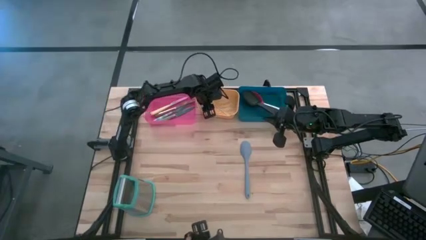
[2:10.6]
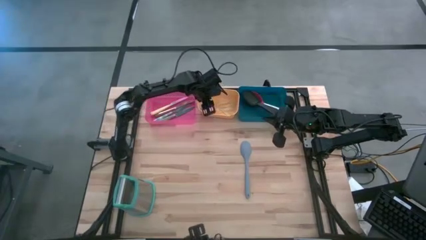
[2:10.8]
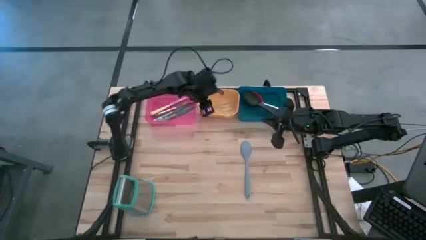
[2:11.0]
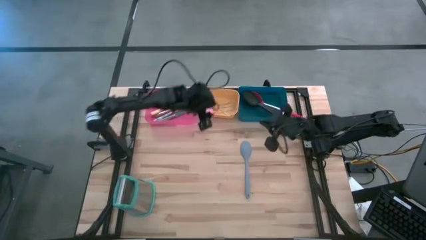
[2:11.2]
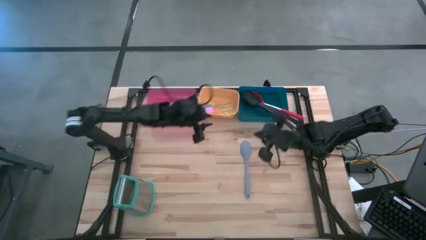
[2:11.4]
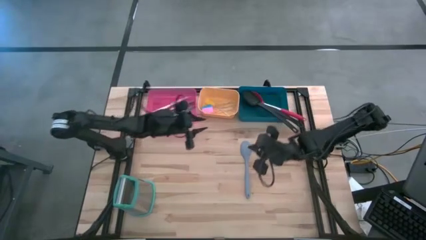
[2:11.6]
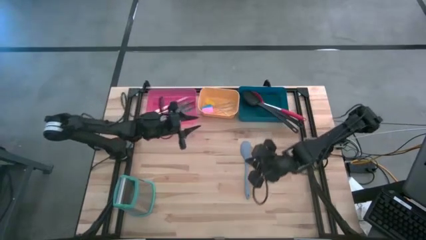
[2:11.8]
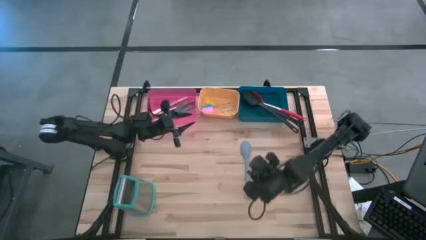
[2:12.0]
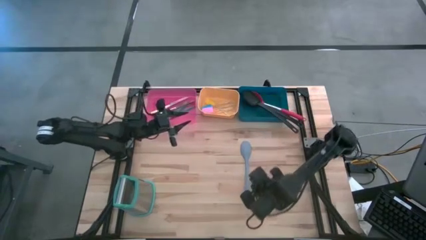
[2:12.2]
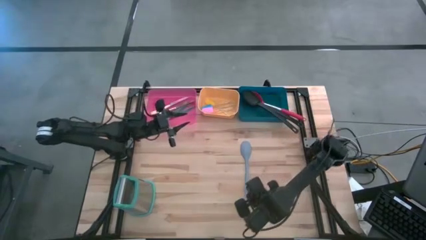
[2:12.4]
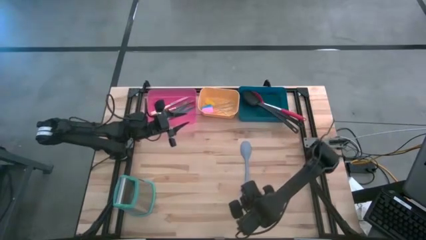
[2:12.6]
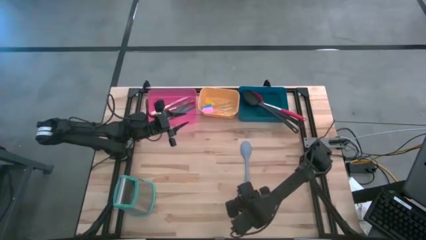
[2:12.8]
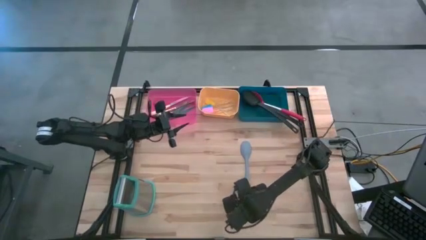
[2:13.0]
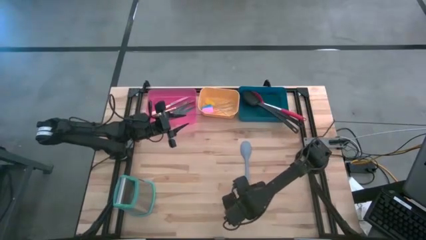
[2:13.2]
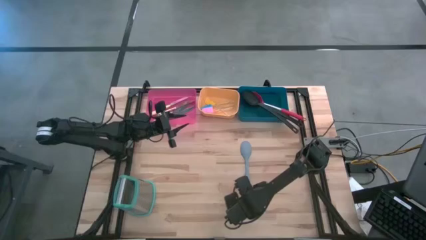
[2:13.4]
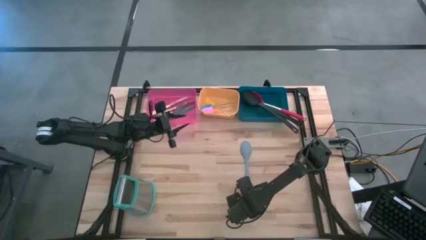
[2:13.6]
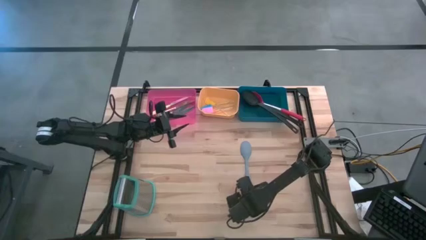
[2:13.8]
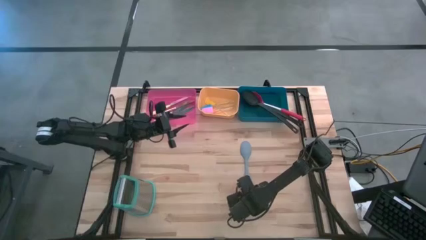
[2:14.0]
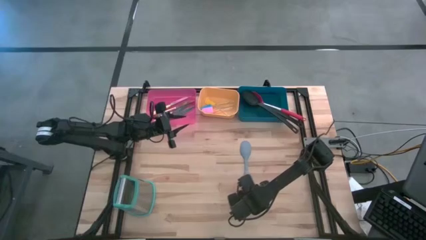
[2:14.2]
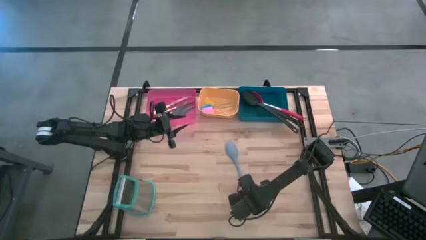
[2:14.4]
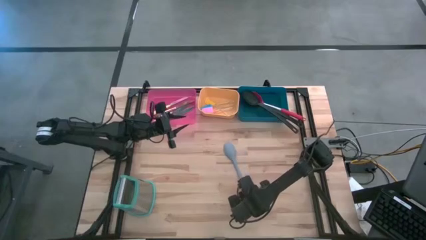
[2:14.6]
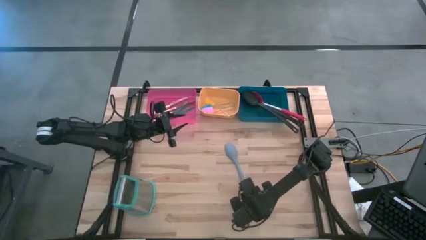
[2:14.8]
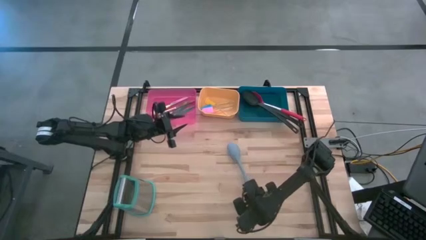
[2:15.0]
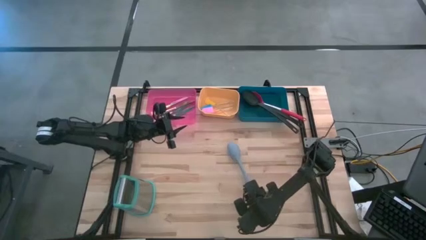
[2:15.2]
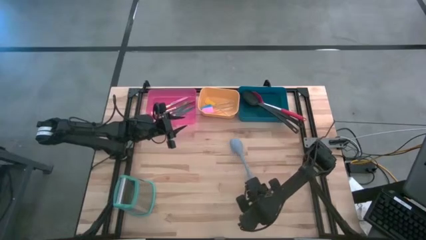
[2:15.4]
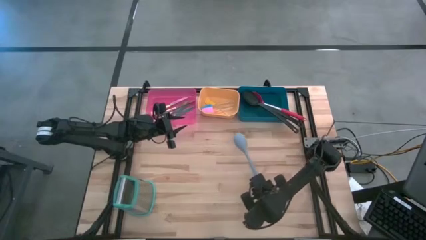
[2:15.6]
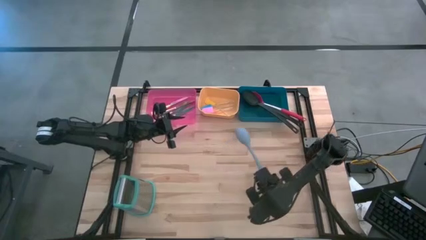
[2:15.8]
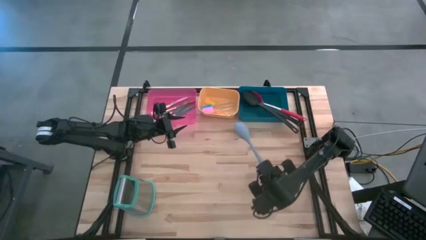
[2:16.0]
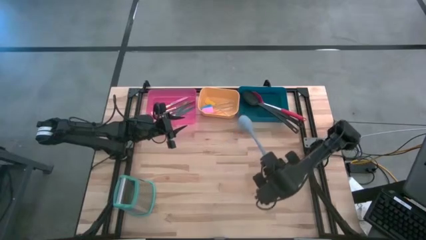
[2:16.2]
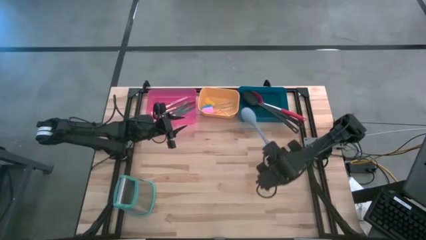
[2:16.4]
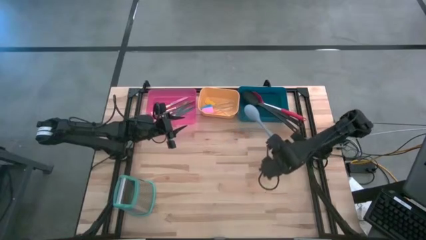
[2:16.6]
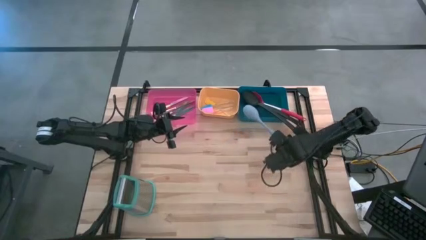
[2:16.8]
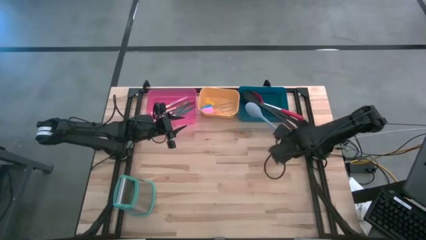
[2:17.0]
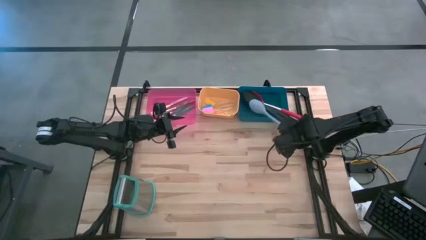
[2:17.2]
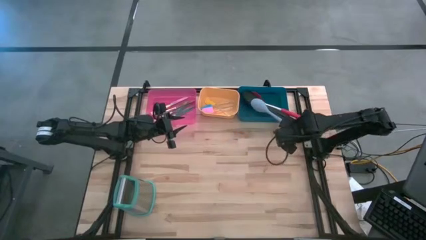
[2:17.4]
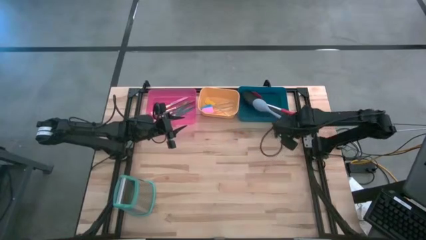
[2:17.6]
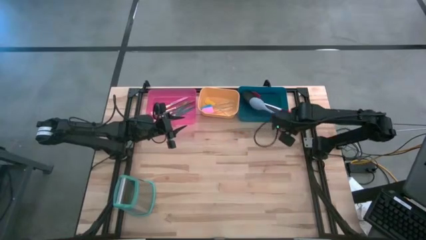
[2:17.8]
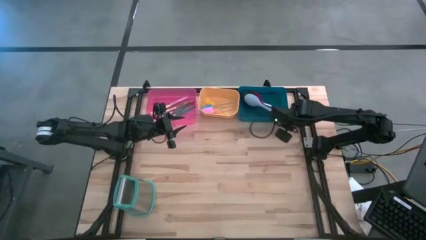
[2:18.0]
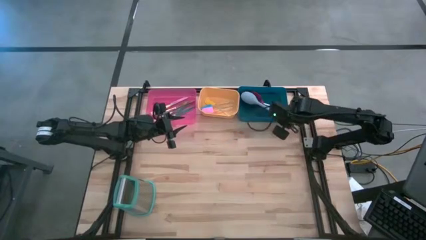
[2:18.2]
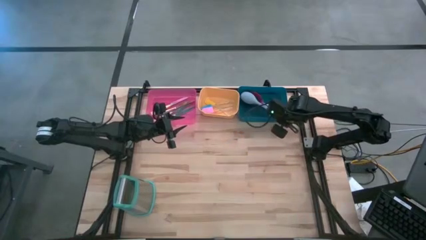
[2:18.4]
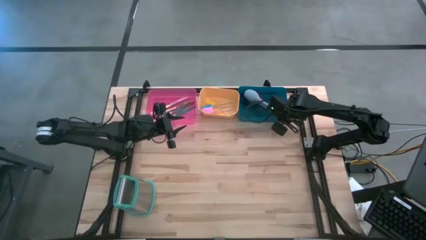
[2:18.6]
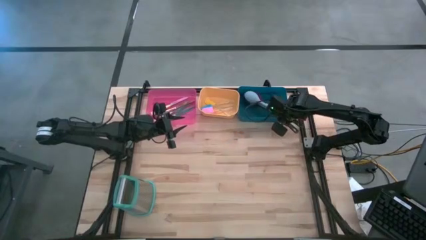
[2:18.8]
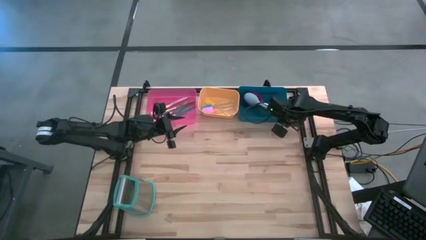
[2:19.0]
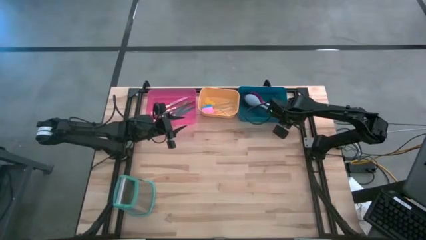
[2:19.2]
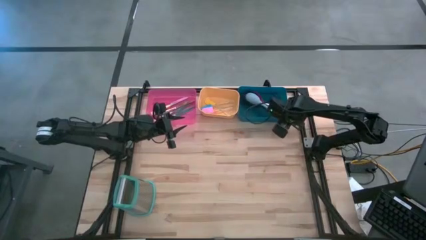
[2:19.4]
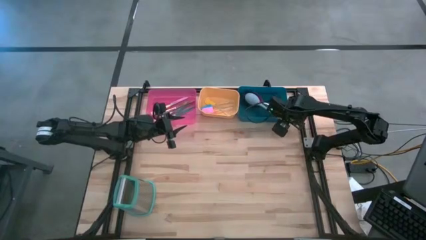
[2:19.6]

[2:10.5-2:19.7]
Task: Pick & Place Kitchen Items
Put the blue spoon into the blue bin

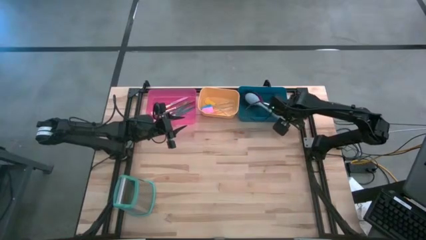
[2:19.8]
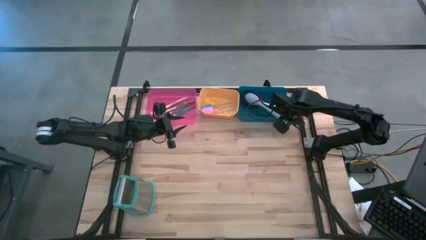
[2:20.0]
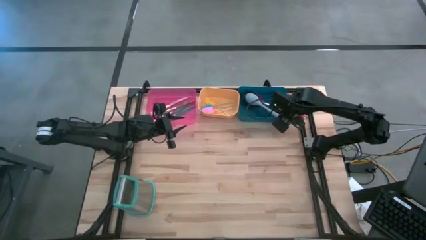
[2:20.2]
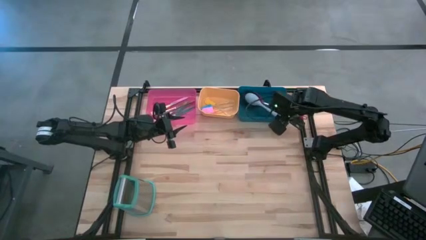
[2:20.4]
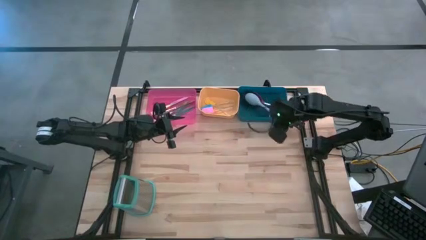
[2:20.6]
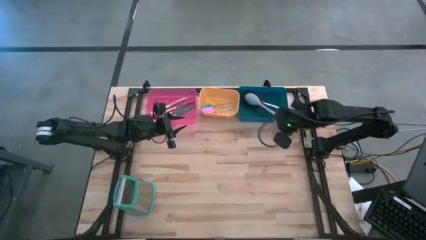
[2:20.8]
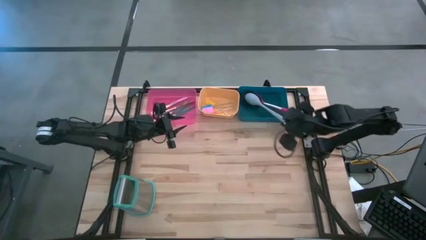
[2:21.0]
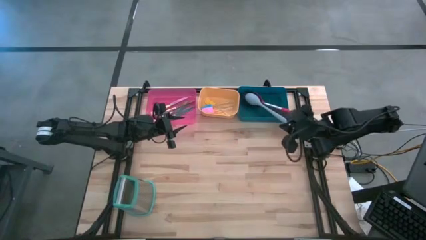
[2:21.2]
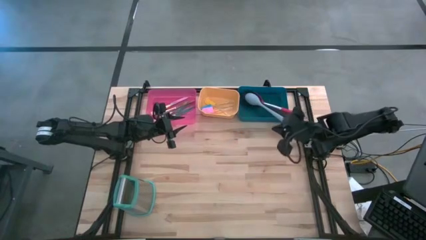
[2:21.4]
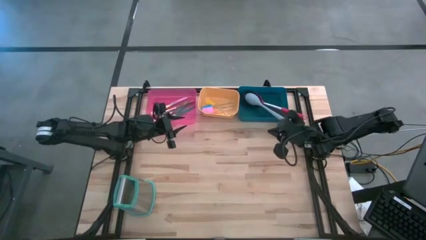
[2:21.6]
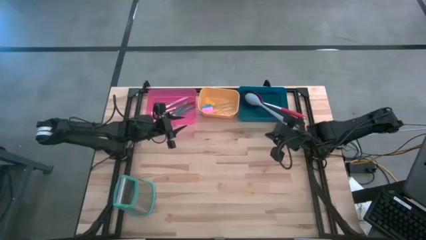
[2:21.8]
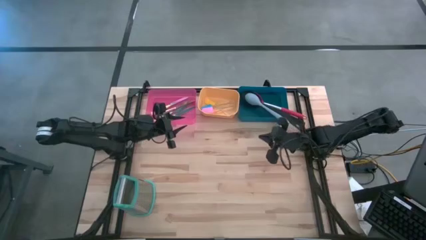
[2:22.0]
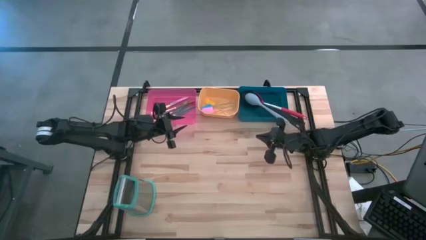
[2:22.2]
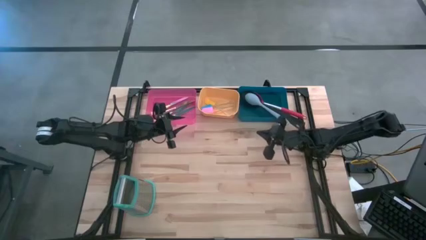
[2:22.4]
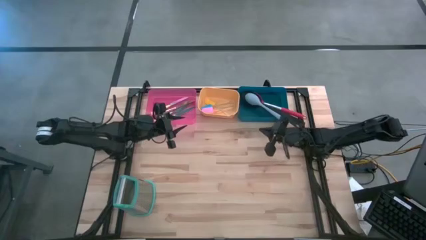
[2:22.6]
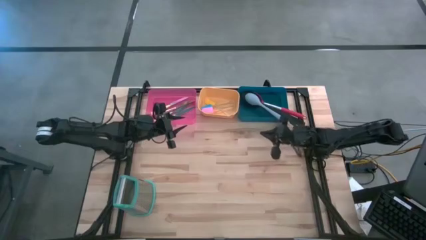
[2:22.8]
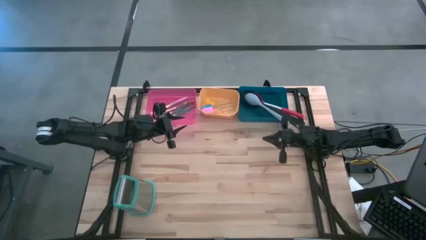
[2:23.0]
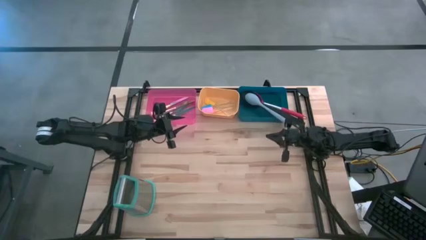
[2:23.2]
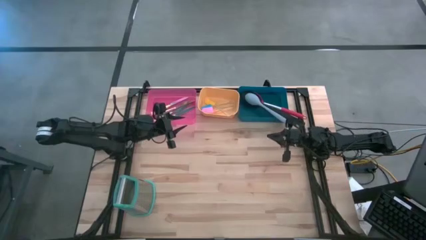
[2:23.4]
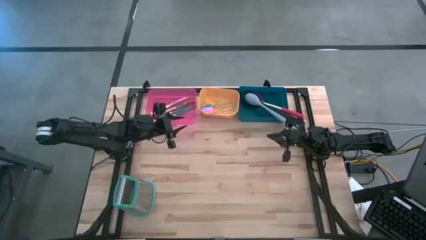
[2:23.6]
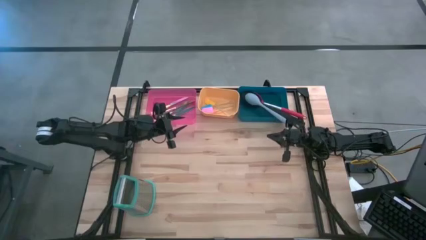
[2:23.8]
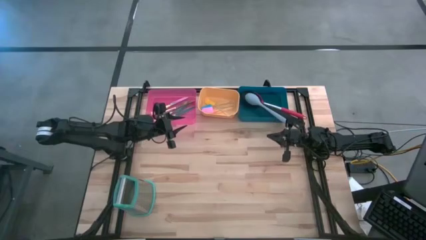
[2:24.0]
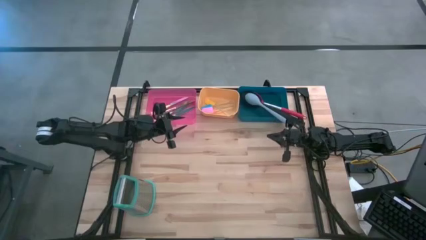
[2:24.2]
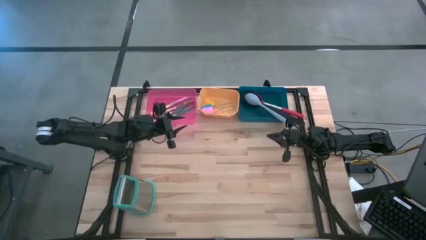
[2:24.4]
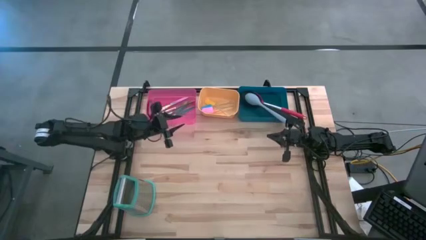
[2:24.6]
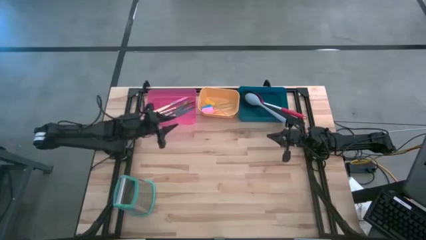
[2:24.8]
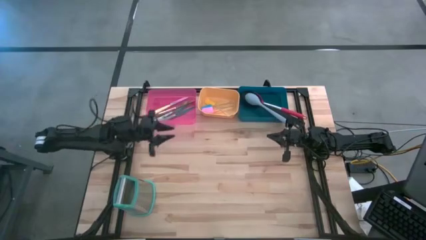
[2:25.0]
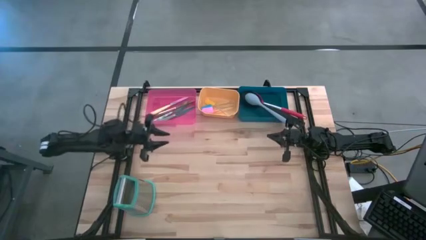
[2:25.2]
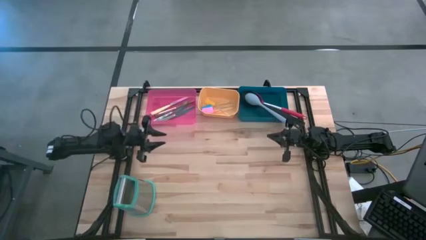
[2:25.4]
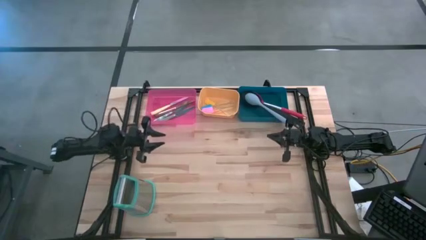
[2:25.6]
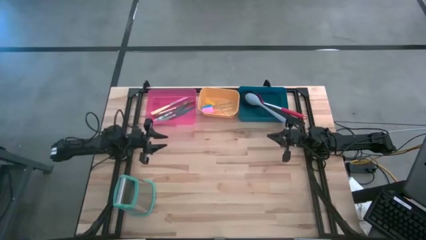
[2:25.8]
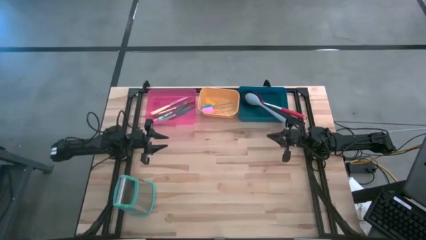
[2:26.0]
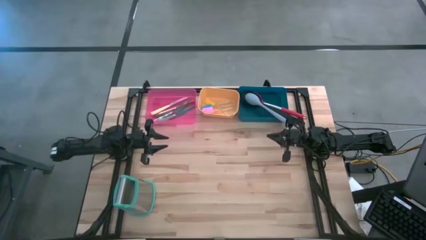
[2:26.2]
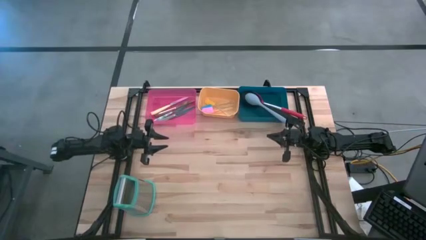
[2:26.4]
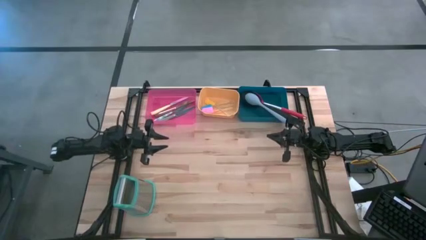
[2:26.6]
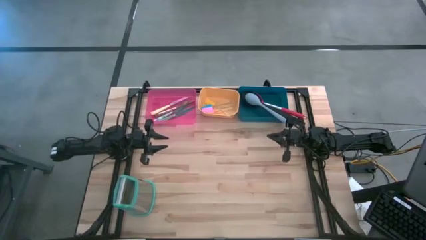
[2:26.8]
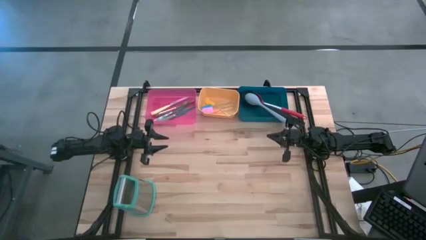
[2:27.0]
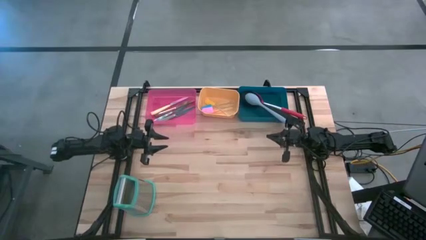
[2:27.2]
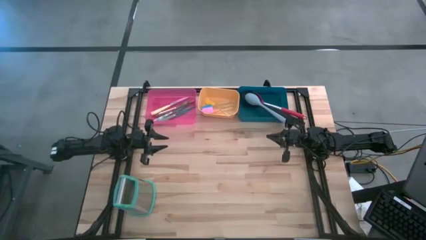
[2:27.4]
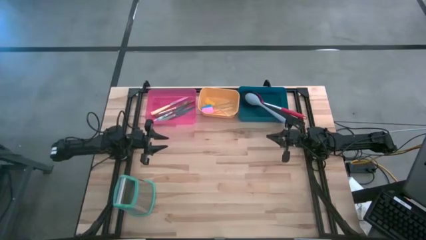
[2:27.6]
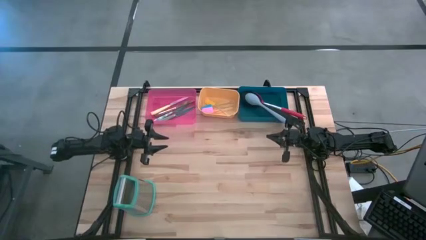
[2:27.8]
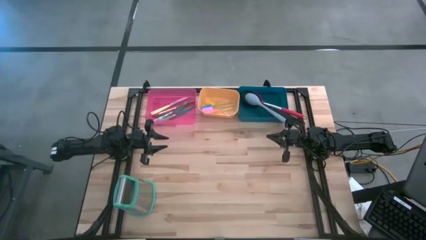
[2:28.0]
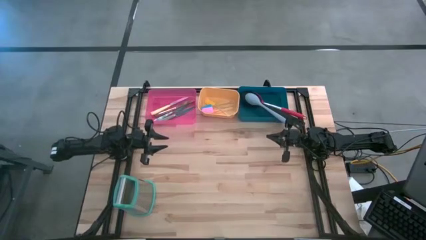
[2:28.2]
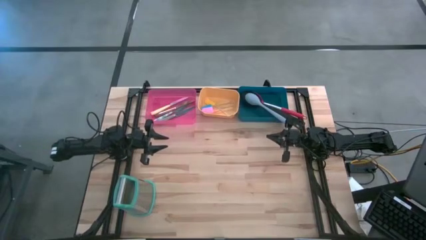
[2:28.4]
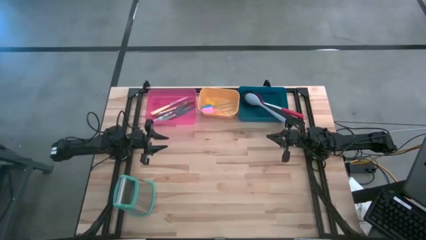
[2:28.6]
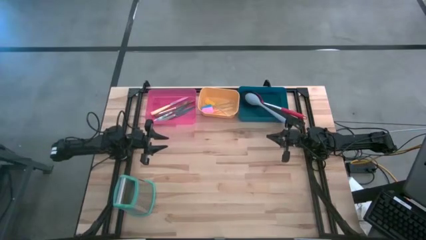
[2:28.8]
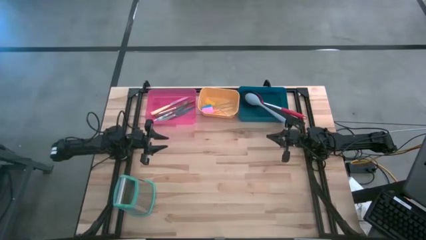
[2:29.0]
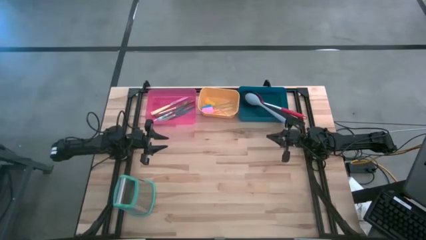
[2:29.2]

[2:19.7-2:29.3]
Return to Home Position
